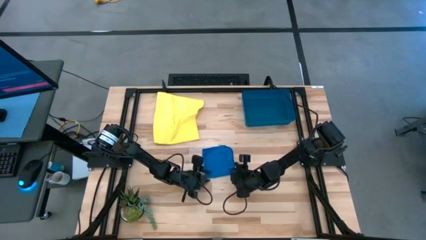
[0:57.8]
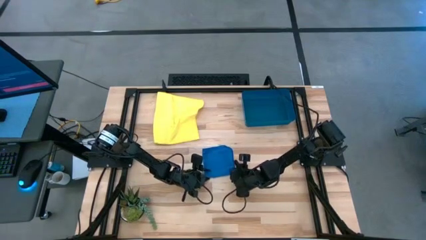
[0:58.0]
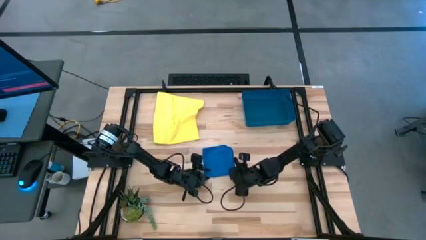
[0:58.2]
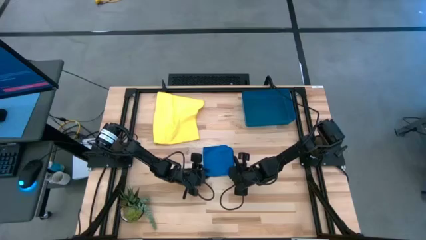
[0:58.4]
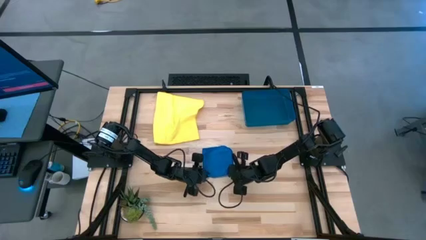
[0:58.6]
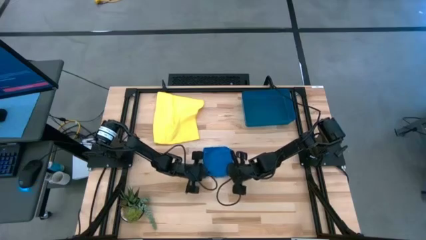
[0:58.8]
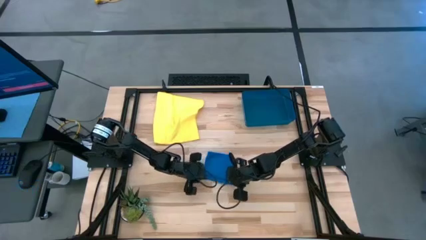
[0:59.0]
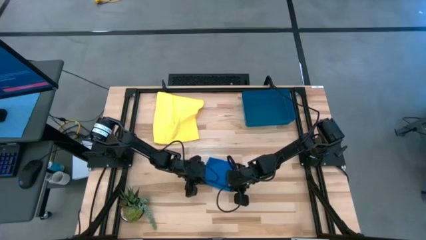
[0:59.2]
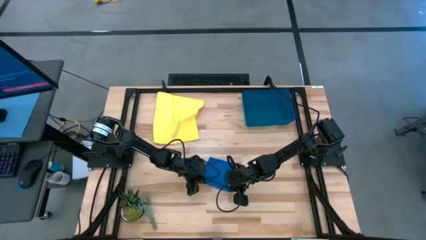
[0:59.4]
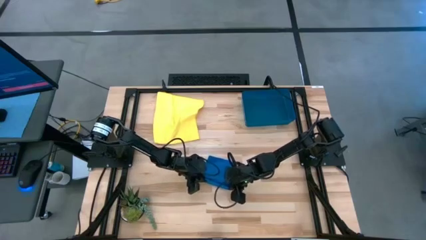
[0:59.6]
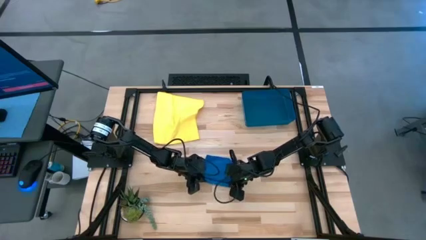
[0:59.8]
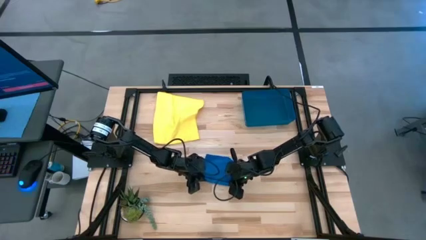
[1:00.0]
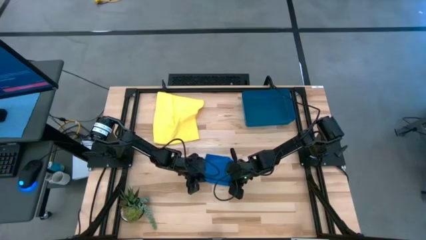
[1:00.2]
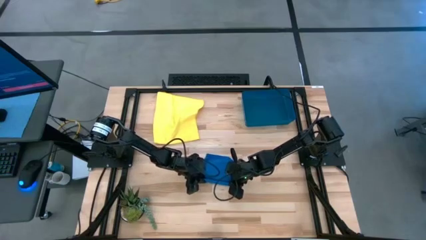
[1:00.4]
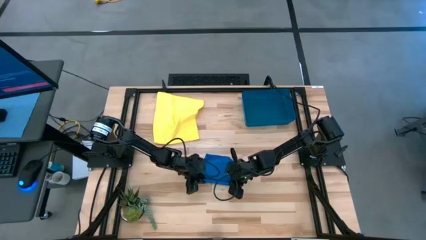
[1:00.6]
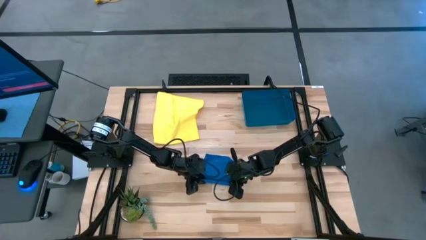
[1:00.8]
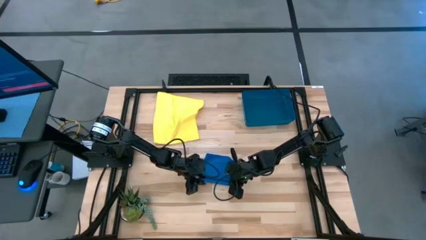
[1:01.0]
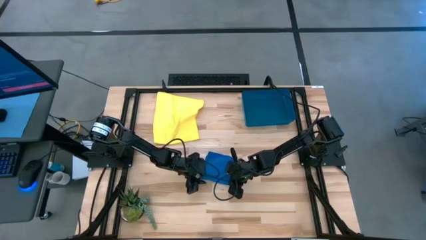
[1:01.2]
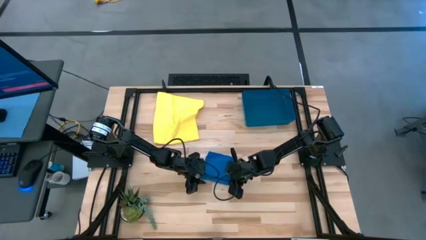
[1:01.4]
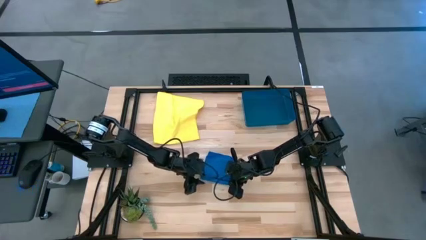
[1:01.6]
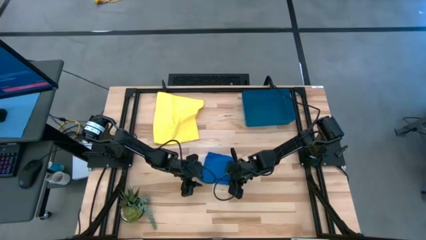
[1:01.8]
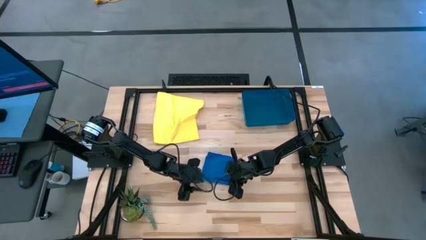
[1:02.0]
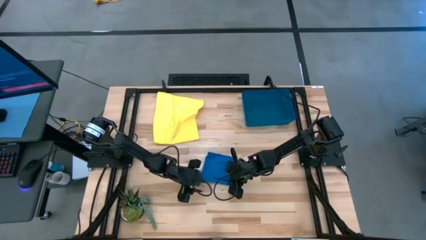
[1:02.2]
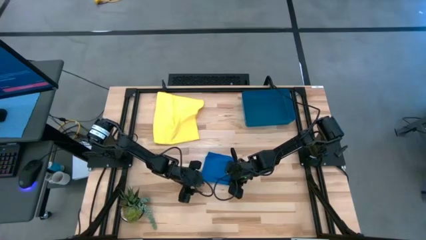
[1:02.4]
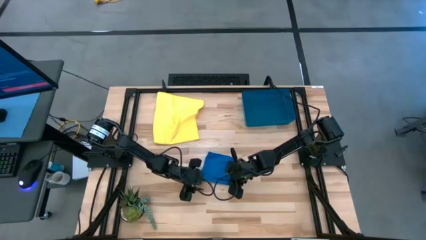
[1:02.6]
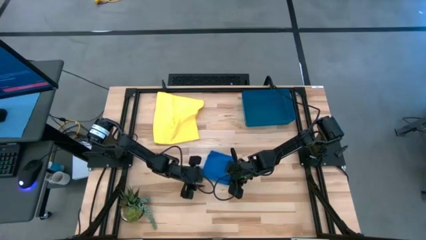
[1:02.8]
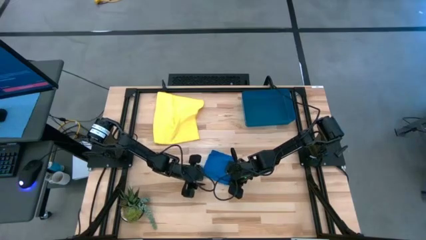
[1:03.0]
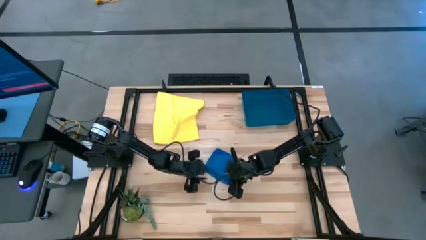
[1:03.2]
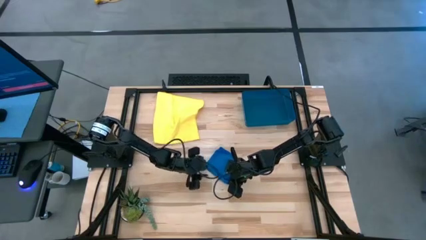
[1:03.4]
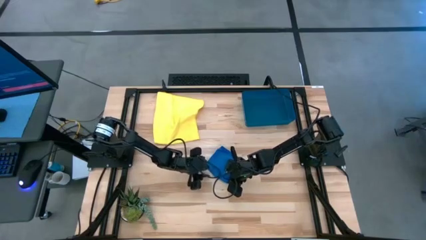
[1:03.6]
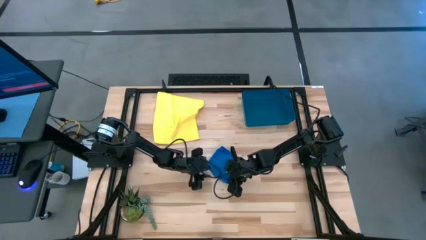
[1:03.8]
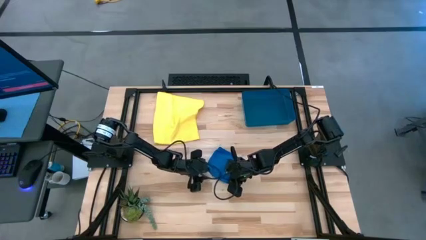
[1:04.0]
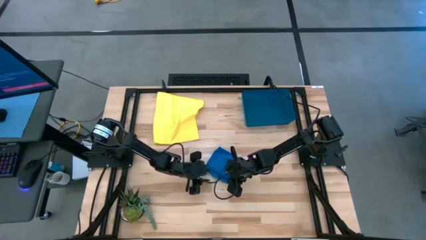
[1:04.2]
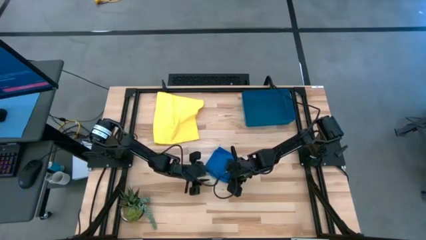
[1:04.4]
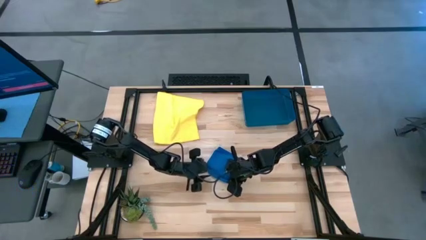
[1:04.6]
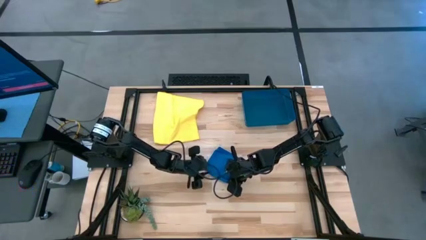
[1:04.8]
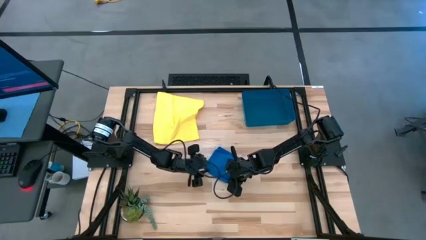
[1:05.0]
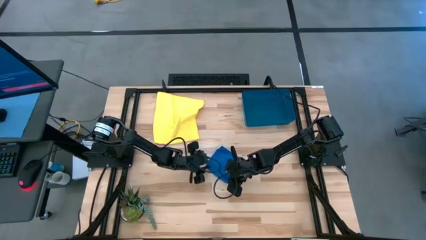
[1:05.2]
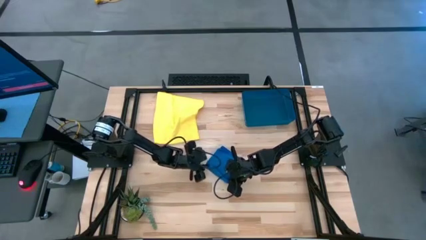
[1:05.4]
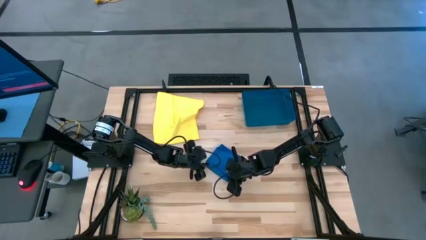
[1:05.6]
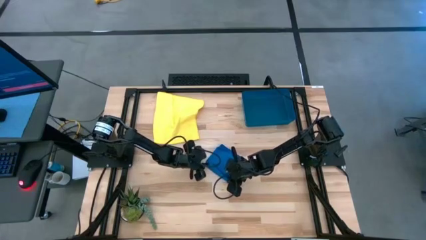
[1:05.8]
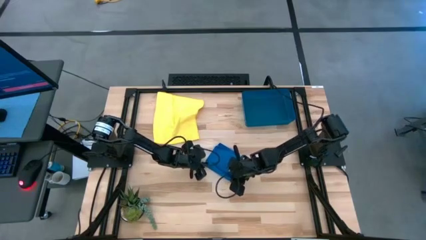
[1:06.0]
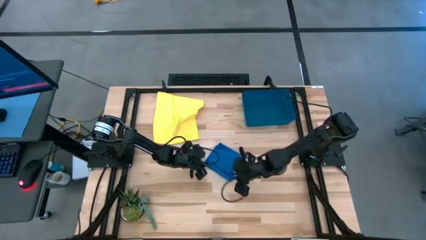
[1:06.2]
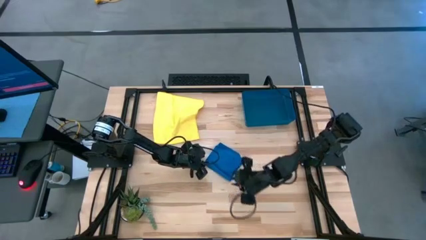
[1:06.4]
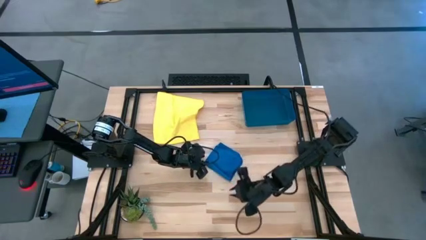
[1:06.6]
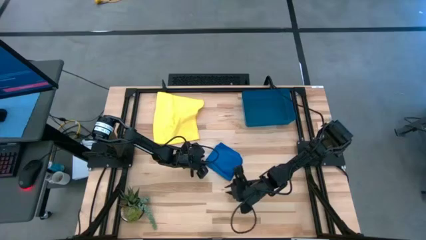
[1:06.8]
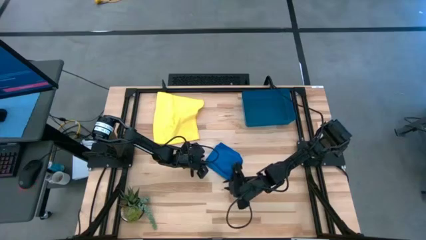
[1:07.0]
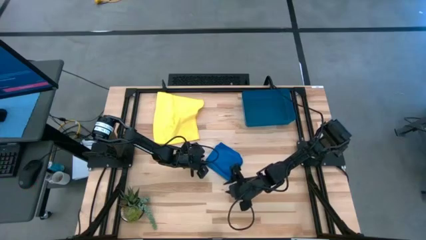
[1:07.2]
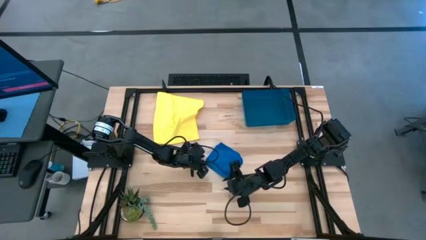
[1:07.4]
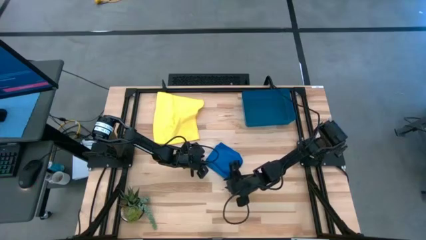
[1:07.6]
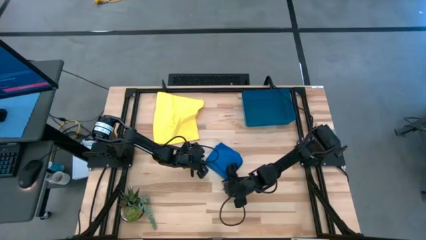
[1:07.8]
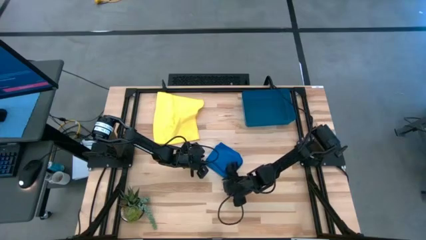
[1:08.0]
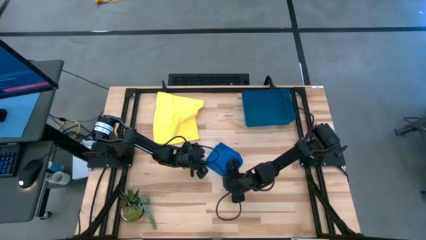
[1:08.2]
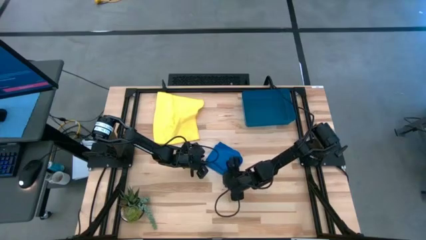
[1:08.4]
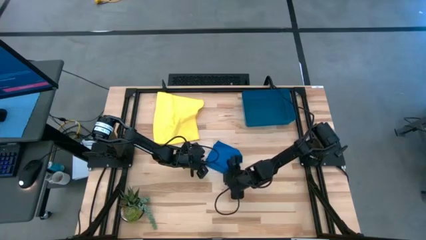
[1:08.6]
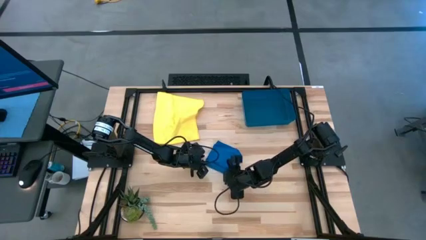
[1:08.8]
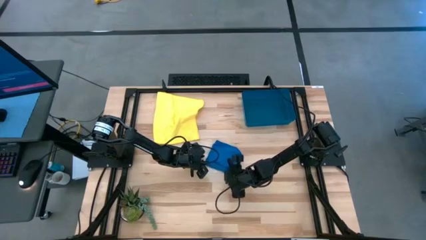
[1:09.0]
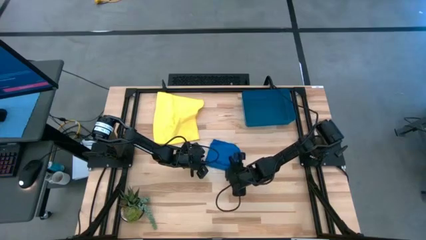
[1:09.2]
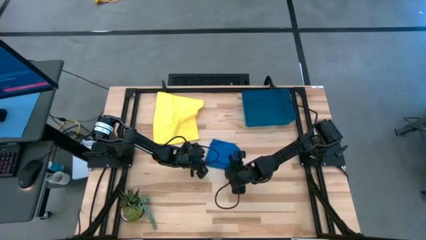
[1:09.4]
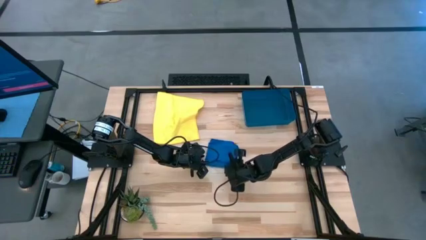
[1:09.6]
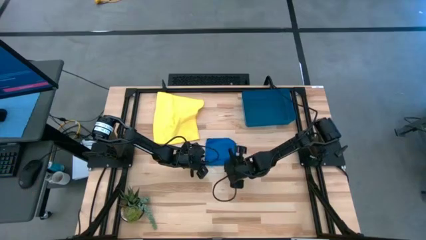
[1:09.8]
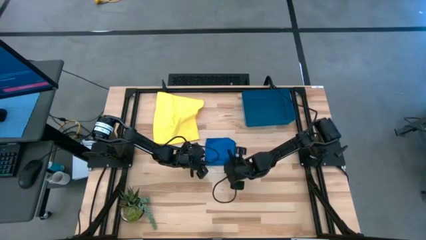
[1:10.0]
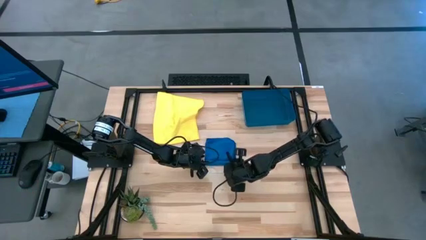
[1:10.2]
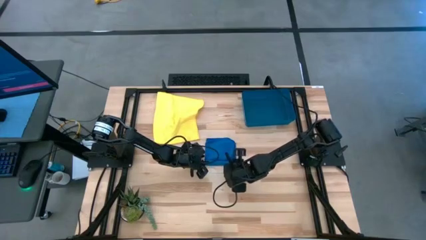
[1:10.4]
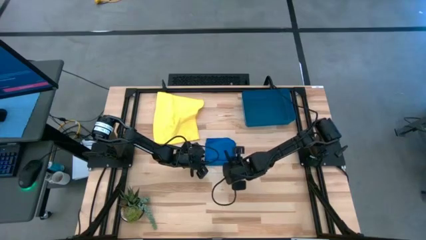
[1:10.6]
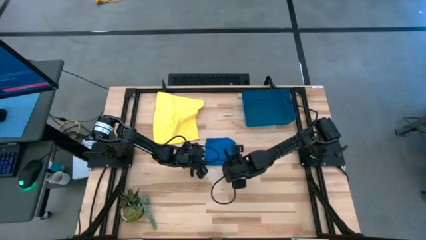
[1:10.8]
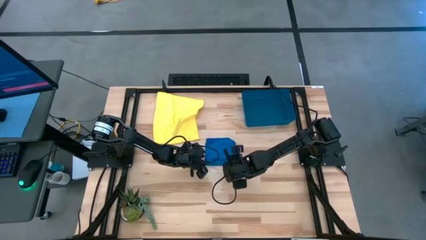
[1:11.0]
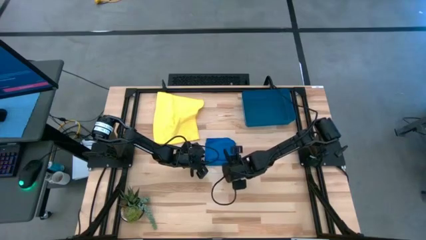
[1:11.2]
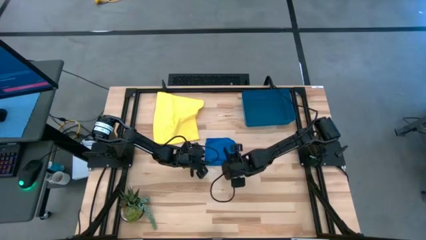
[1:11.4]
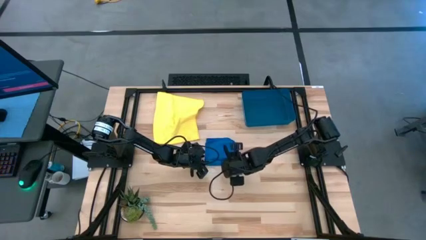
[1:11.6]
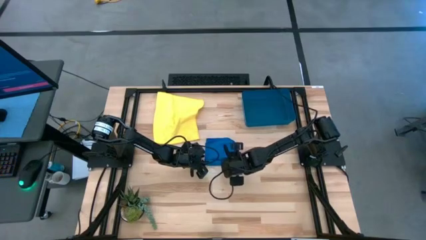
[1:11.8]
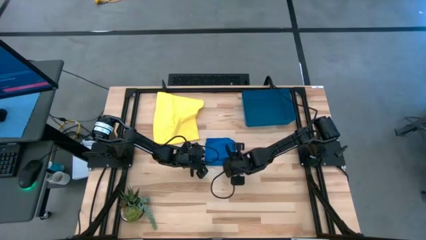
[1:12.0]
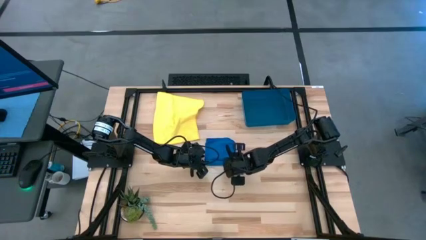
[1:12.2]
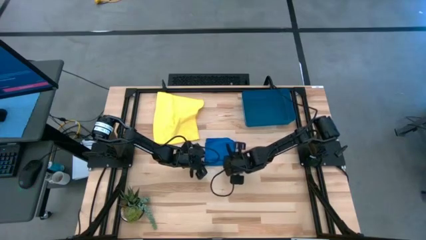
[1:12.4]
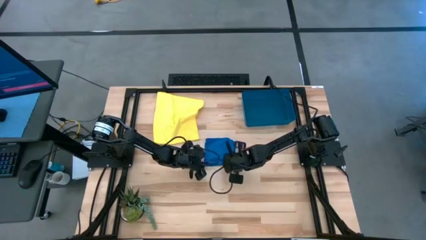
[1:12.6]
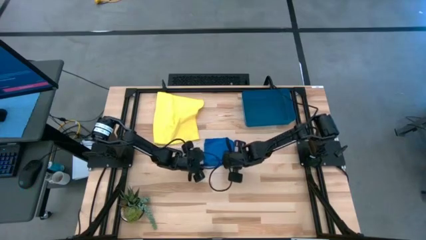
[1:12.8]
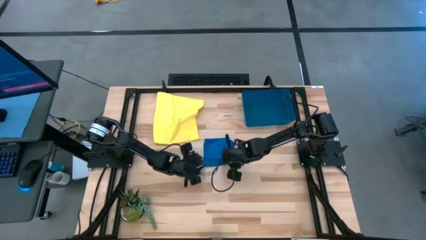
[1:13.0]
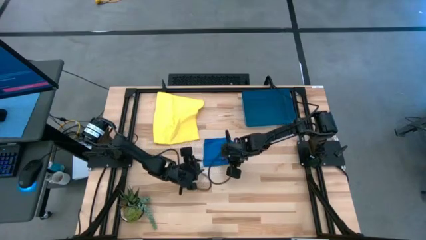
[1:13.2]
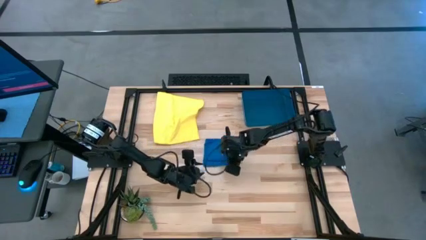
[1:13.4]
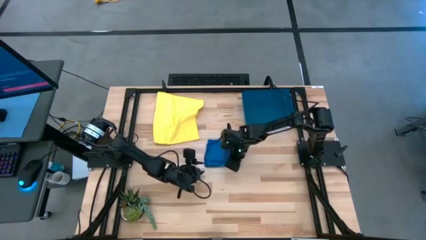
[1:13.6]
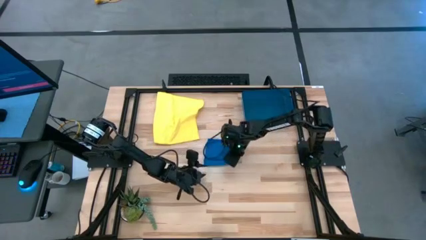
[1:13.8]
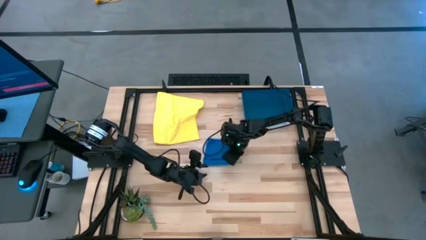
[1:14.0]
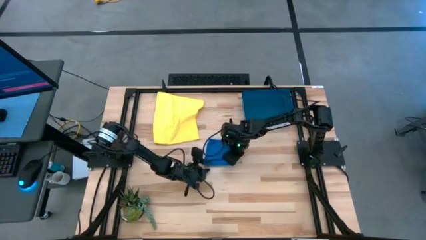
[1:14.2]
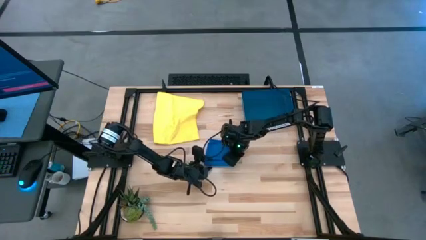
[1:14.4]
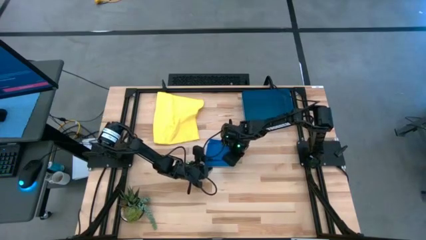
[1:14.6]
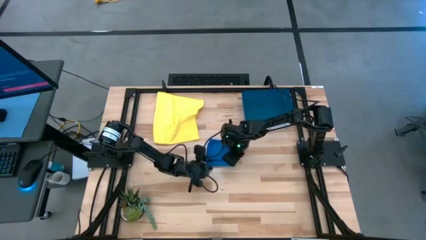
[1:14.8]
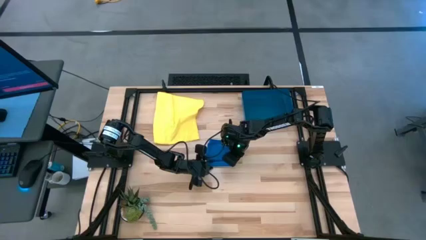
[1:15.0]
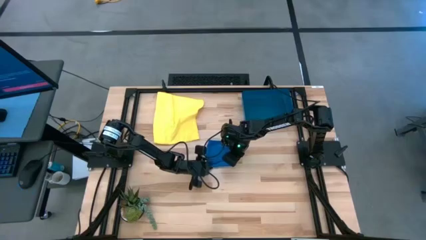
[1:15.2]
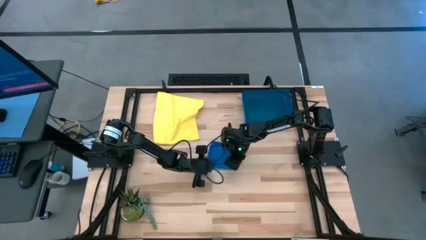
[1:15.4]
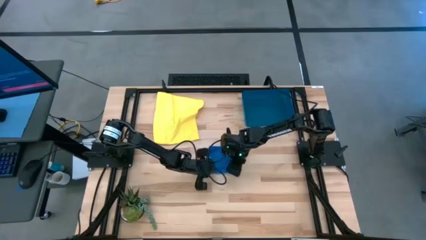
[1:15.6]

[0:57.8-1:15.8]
Task: Roll microfiber towels into tight, uniform cylinder then place into a basket
Roll the blue microfiber cloth
